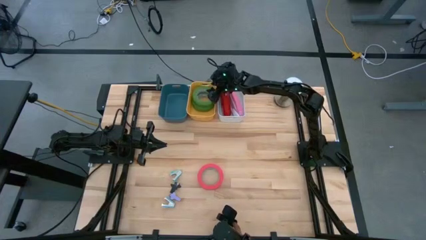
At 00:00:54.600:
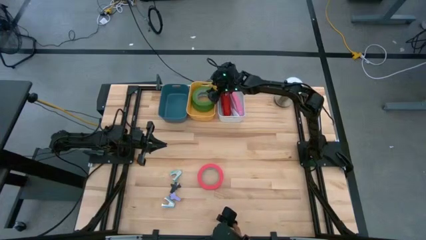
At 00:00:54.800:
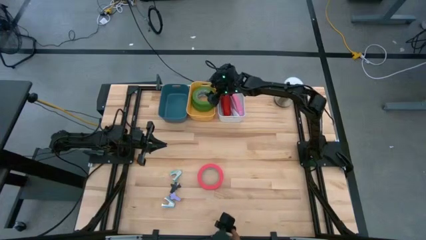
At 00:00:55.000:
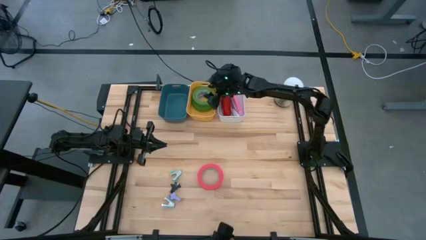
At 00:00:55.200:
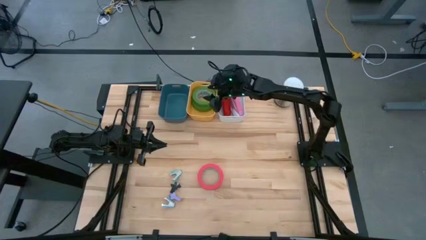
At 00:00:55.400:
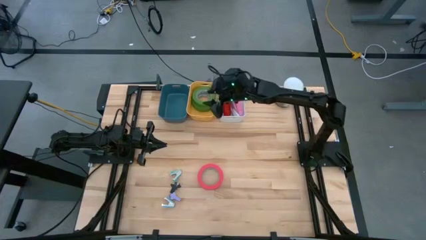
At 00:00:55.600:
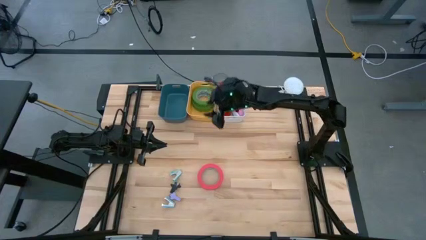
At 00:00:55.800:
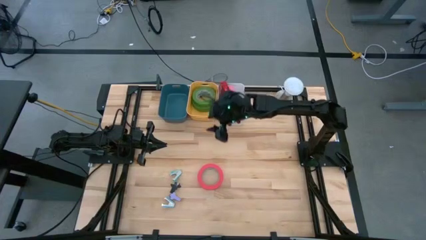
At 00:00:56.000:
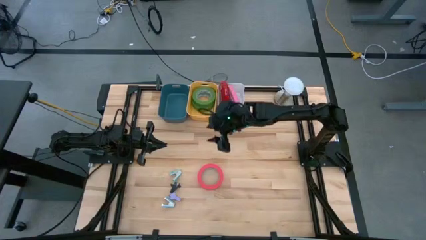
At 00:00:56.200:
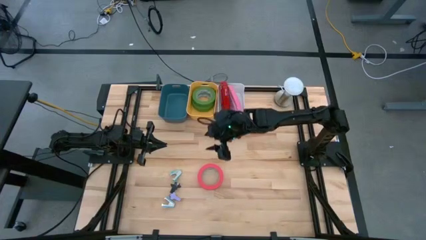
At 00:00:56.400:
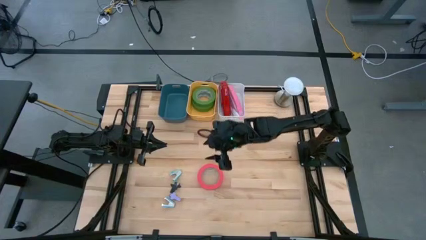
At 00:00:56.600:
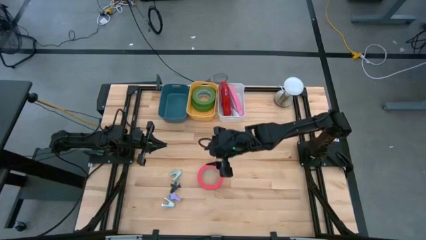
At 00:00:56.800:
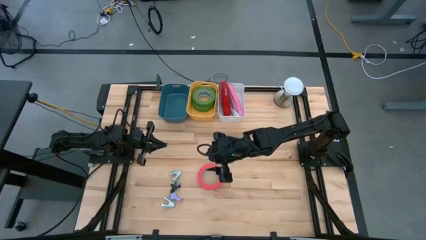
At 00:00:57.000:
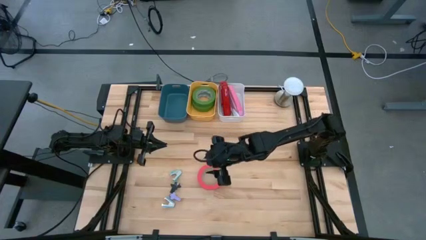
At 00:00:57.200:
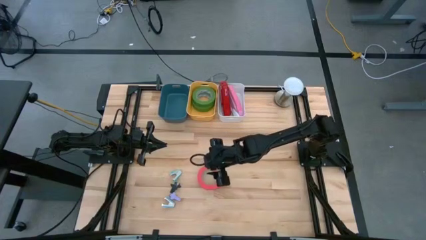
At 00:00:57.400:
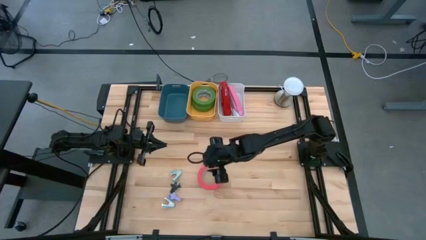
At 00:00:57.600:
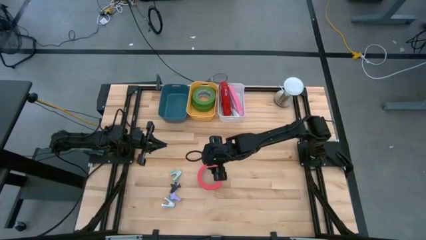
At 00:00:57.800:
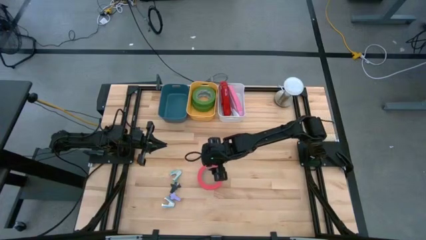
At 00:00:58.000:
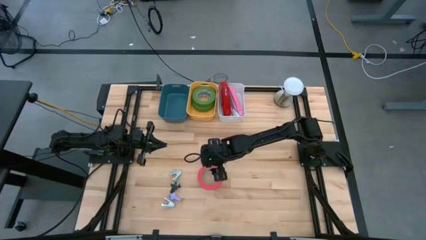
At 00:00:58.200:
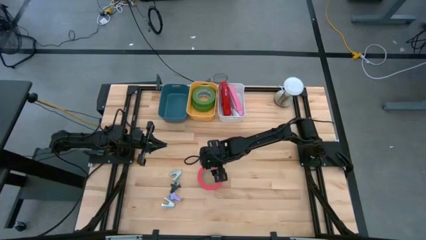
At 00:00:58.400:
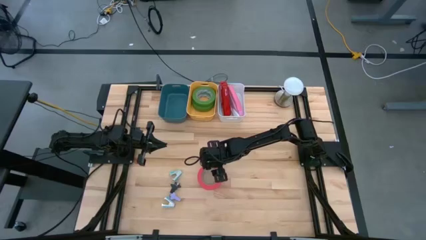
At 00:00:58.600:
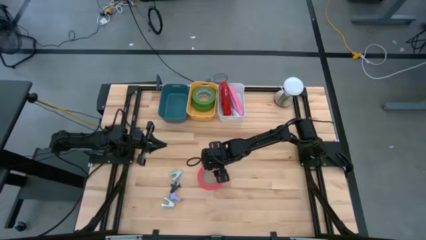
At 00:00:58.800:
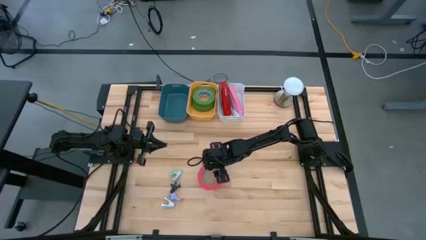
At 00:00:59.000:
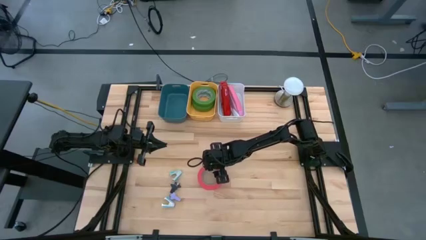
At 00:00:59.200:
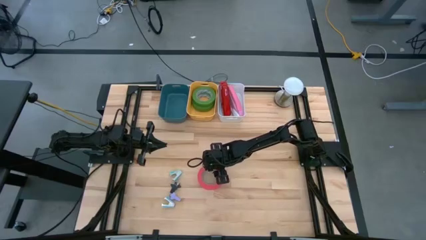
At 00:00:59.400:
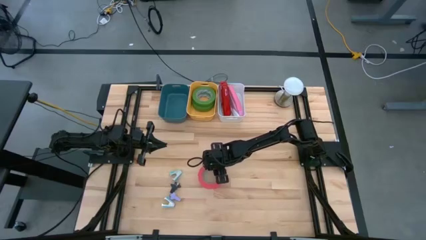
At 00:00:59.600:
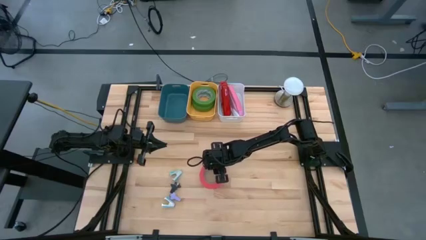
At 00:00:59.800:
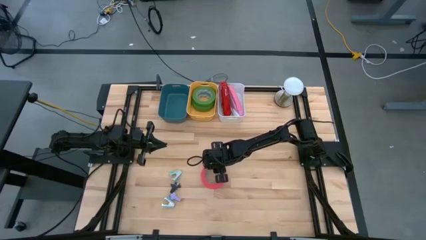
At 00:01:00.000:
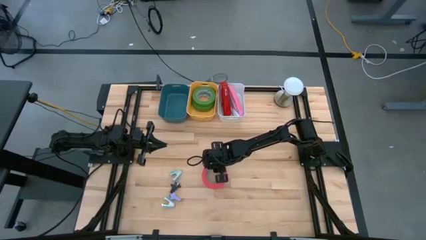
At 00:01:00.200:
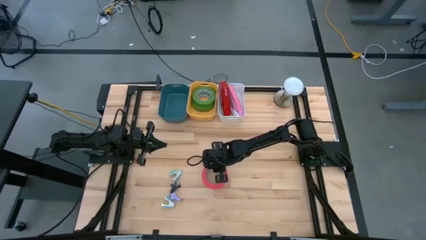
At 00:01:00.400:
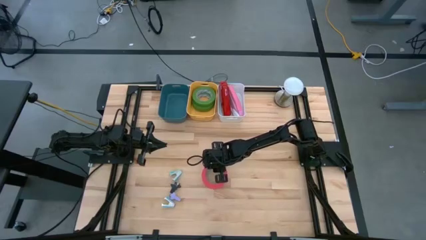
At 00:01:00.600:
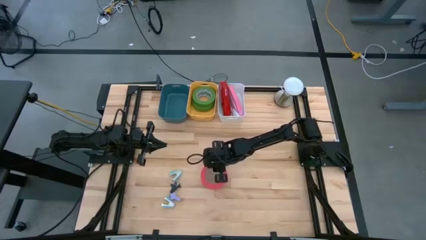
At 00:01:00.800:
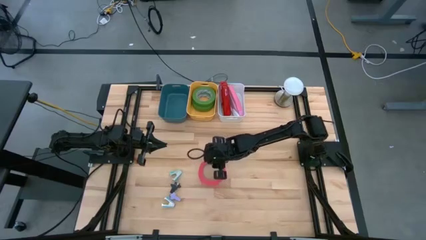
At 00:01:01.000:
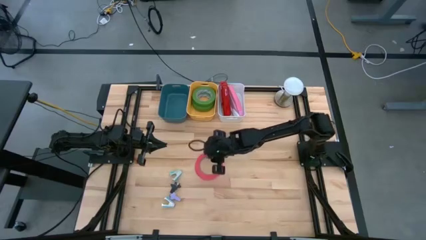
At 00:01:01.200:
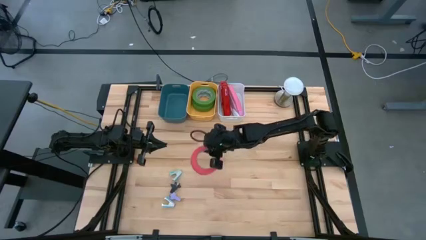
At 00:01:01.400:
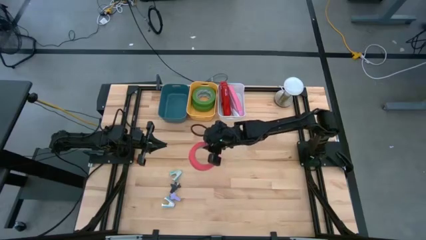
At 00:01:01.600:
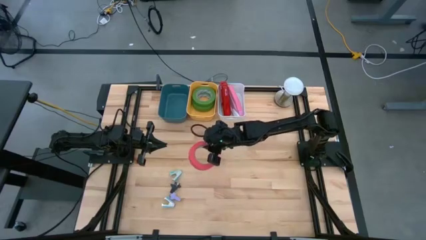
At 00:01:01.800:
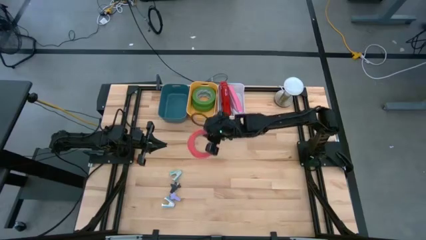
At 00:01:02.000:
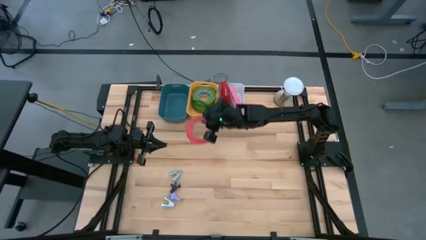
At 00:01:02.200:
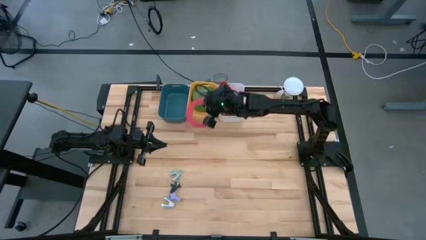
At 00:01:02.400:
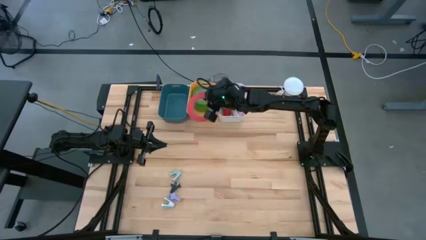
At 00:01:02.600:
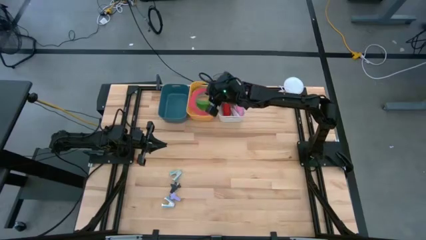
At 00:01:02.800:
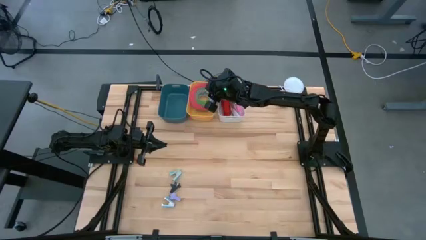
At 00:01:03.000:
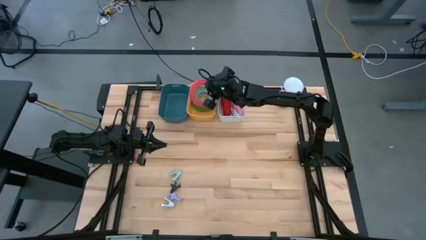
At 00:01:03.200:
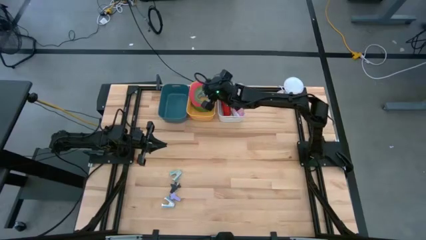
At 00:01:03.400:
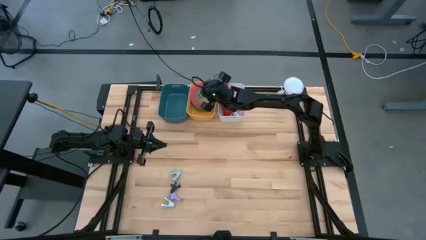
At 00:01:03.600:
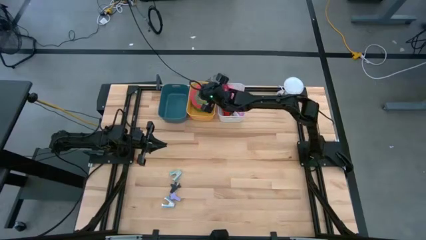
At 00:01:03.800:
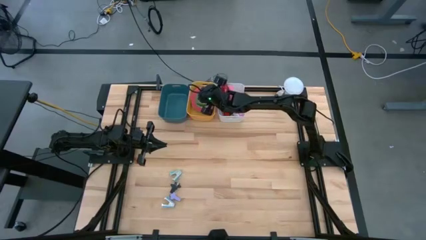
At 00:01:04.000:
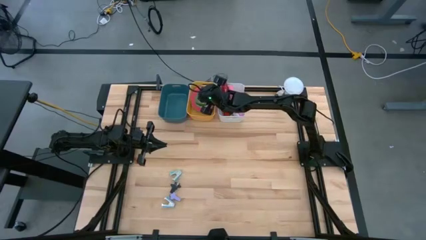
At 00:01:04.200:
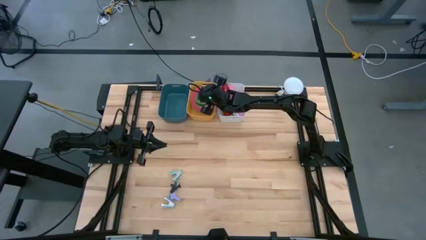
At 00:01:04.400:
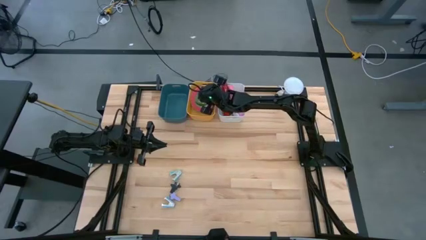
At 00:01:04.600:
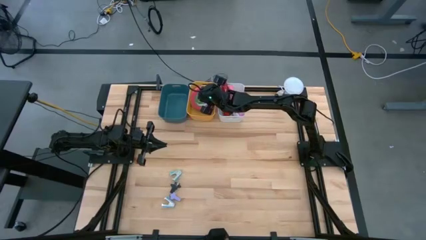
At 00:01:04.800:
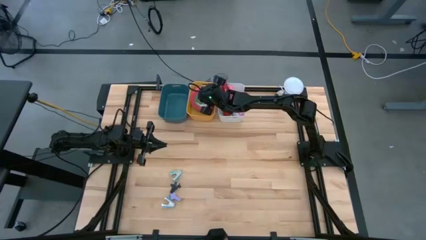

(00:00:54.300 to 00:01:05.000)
Task: Pick and place Stapler, Stapler remover, tape
Put the pink tape into the yellow bin

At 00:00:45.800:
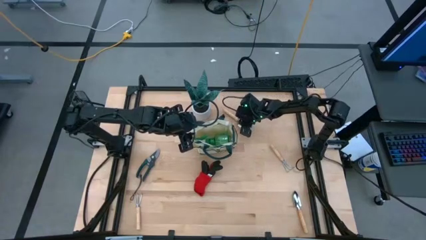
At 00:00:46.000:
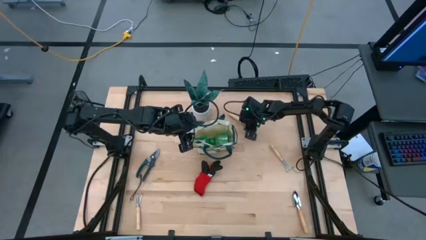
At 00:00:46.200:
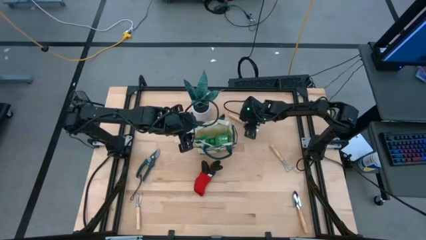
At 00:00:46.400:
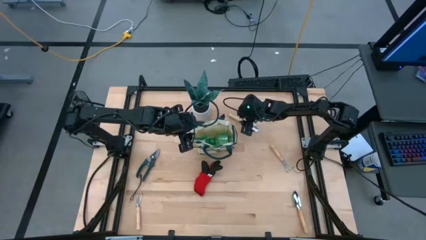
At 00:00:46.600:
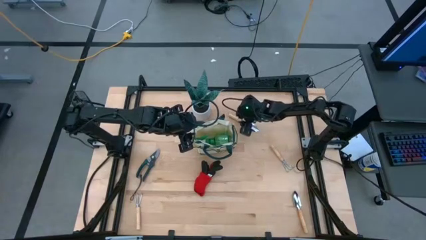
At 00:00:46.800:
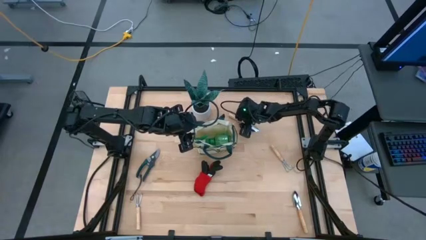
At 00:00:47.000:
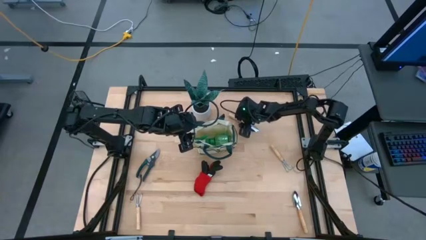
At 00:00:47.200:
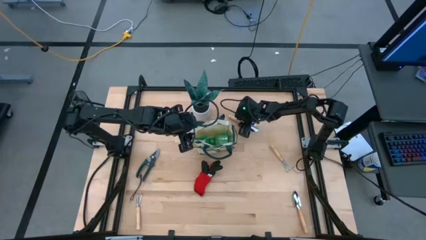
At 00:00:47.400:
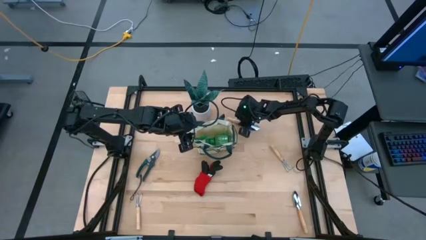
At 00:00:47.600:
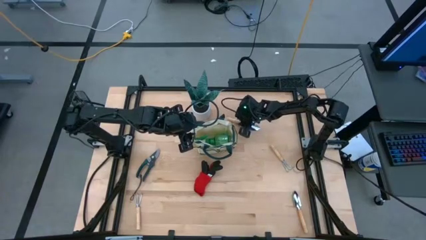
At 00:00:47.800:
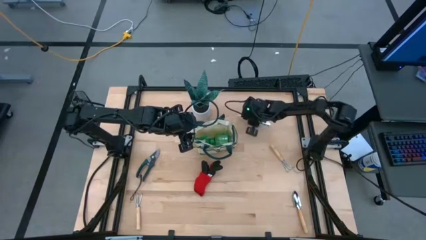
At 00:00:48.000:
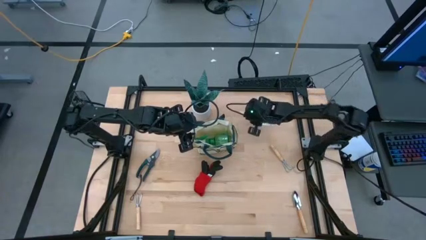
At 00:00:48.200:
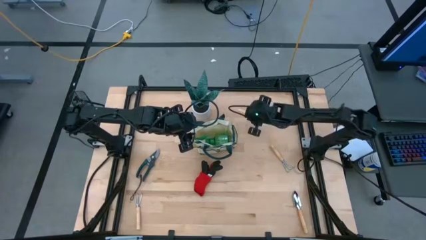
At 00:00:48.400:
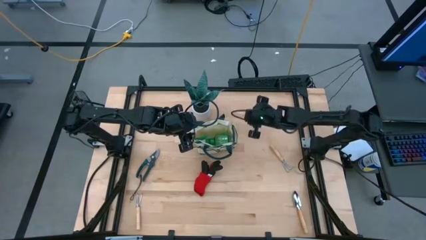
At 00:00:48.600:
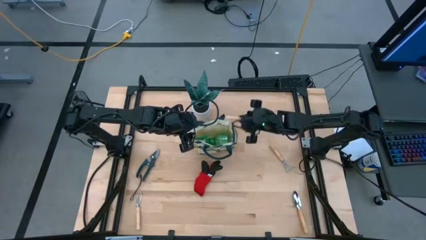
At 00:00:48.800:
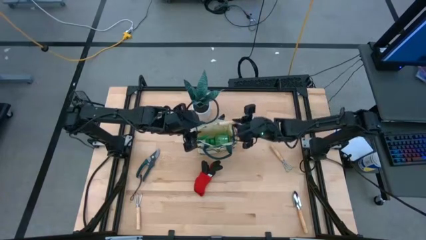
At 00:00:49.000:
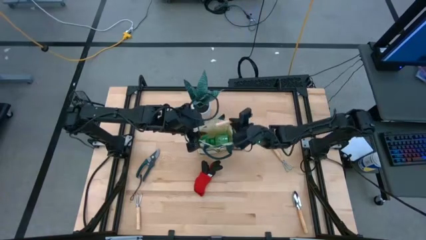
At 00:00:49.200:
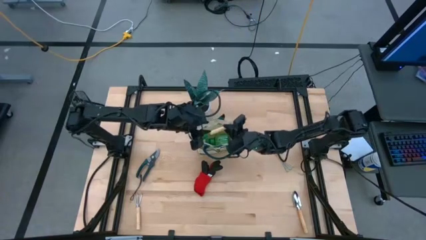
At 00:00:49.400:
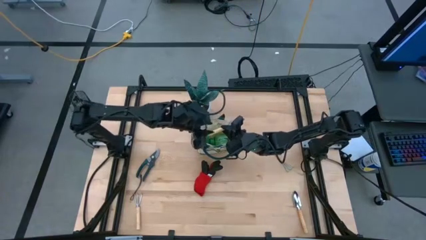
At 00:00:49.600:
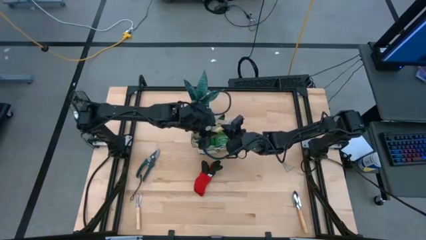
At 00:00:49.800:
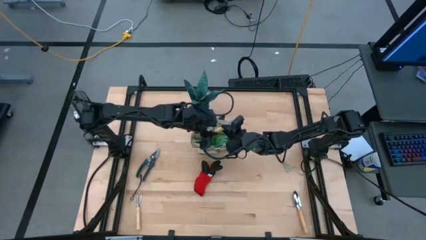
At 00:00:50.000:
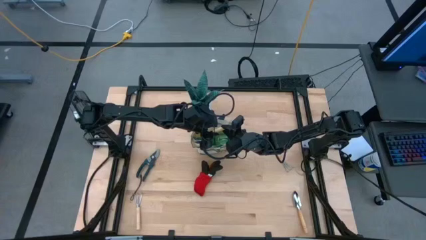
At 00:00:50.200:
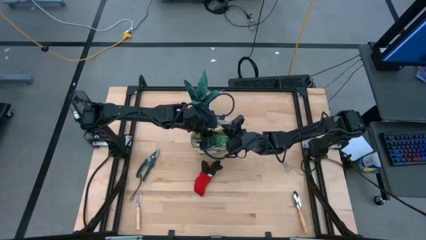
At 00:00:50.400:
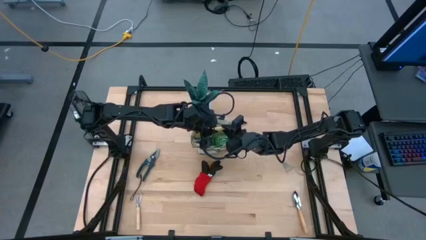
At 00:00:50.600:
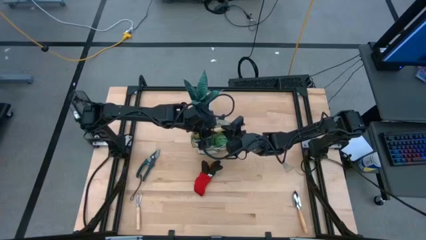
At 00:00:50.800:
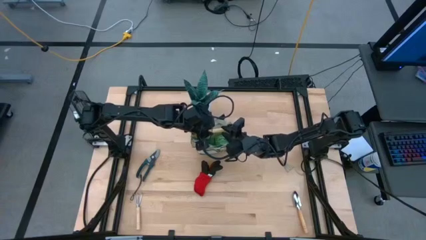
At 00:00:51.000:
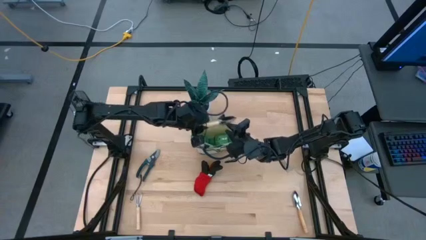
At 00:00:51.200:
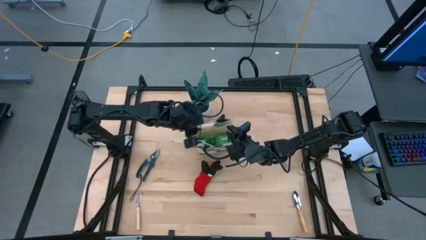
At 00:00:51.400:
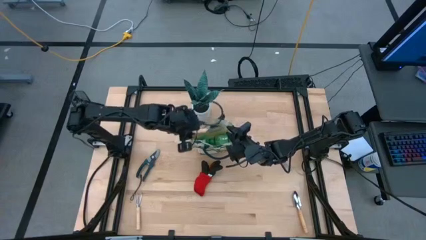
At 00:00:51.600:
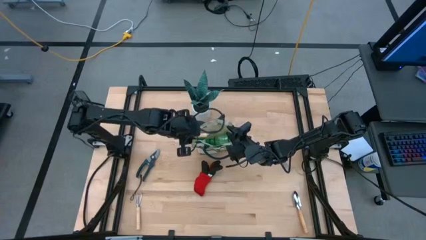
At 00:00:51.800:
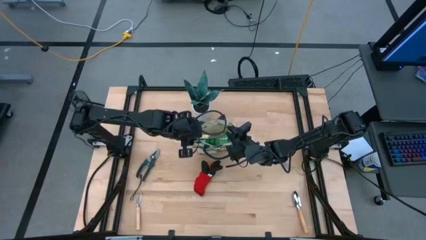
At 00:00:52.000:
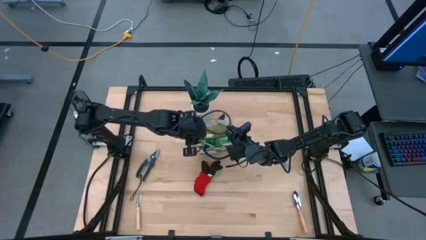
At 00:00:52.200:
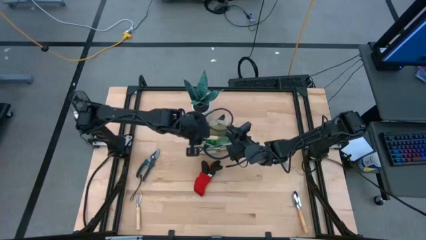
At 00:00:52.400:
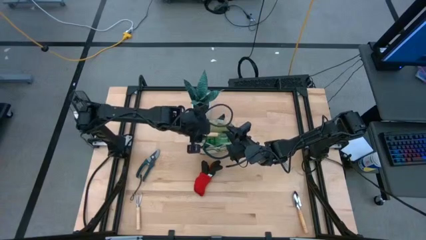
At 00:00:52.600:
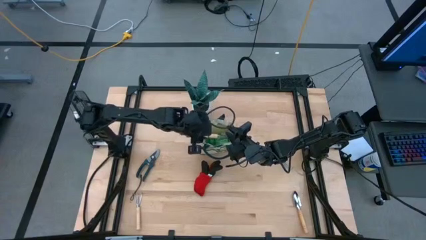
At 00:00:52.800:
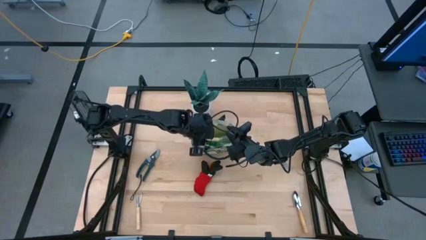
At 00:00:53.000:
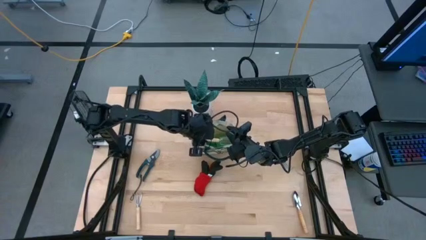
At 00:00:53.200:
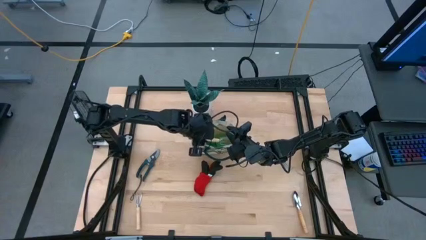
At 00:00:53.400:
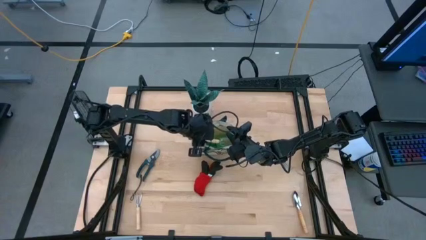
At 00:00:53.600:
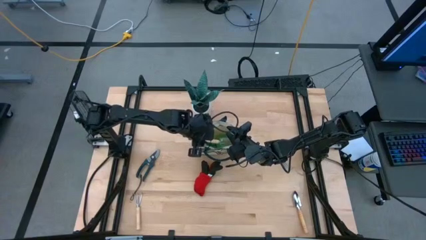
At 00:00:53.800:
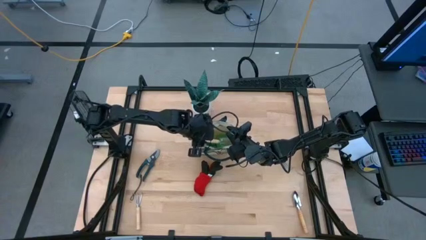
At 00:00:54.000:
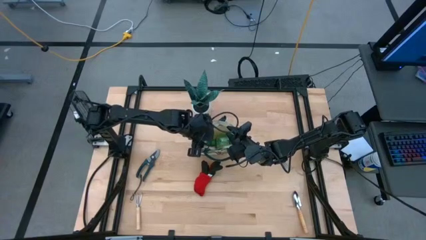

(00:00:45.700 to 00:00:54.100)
Task: Pick & Place Garden tools in Gardening bag
Put the top brown trowel into the gardening bag
